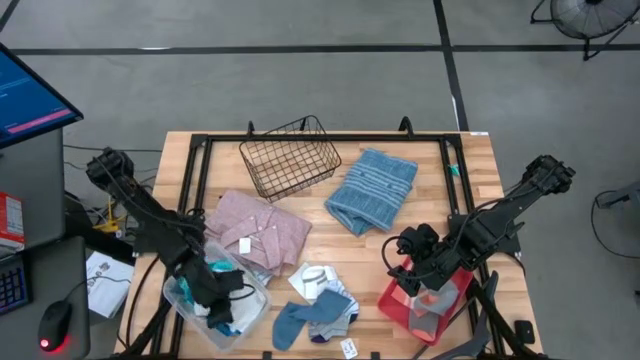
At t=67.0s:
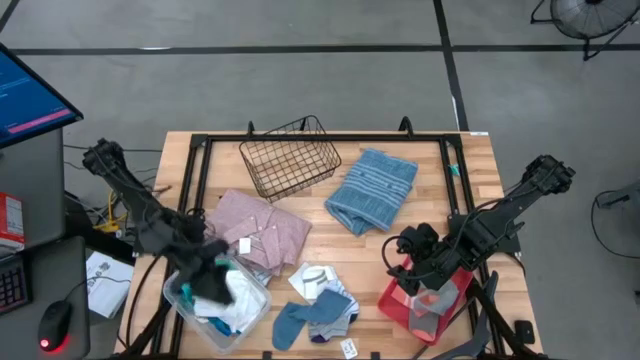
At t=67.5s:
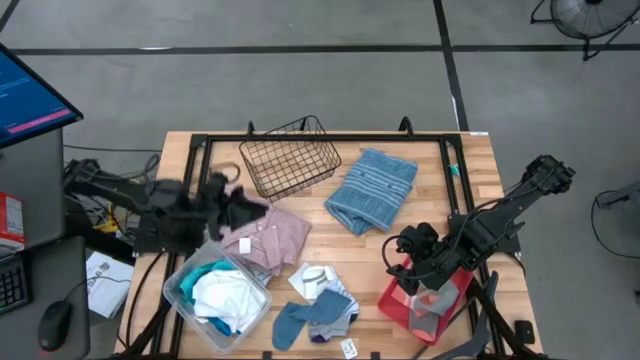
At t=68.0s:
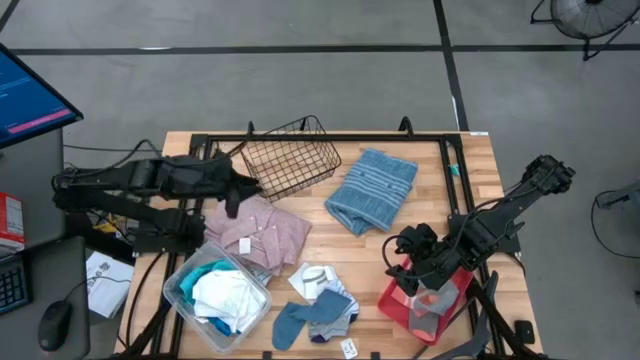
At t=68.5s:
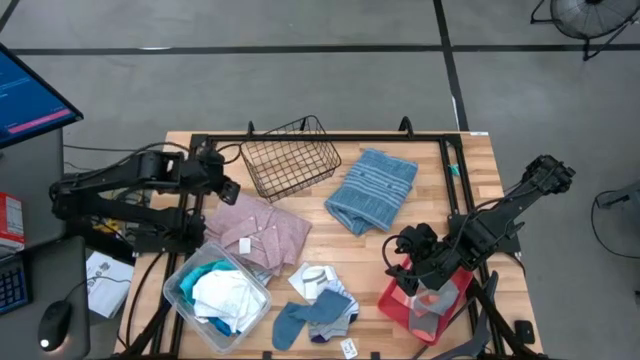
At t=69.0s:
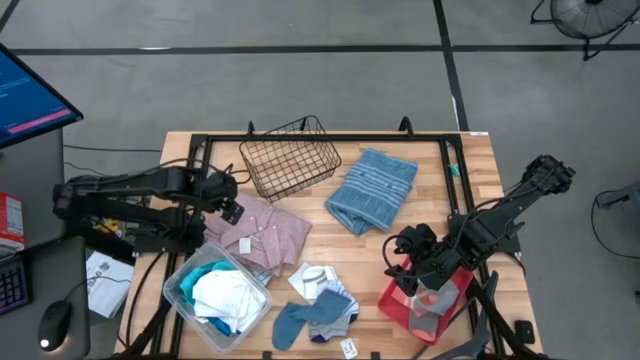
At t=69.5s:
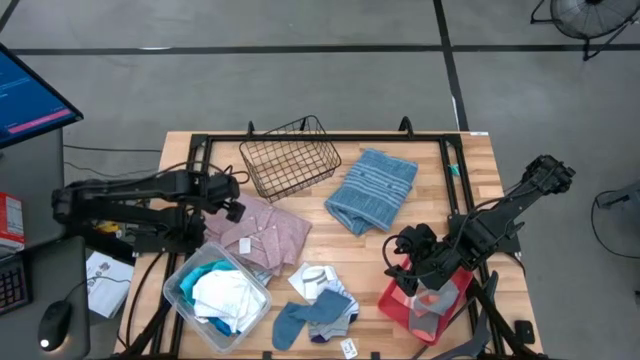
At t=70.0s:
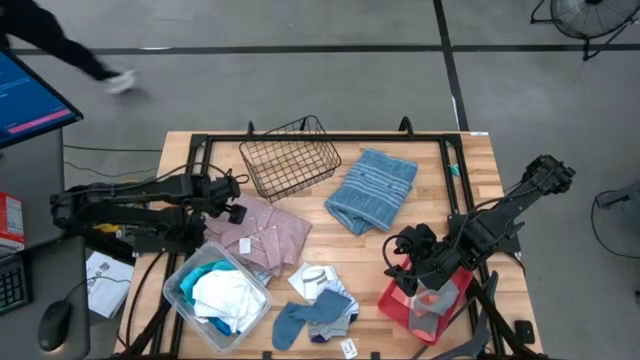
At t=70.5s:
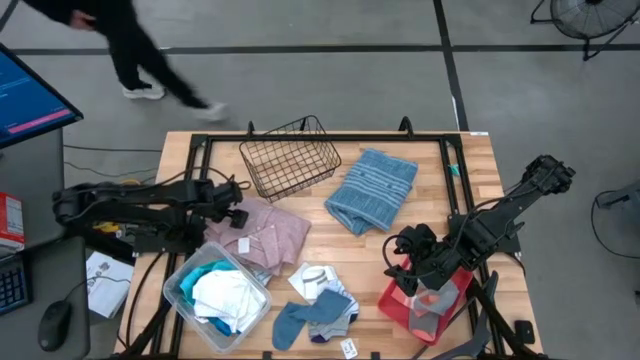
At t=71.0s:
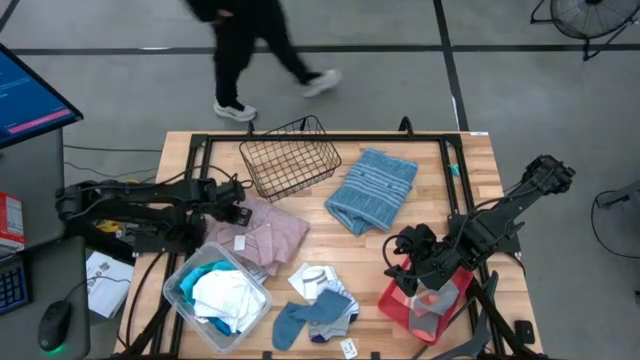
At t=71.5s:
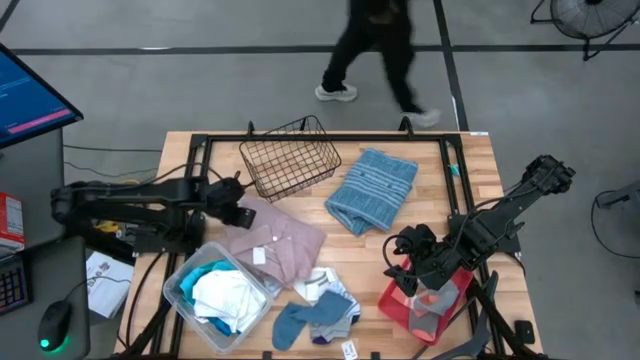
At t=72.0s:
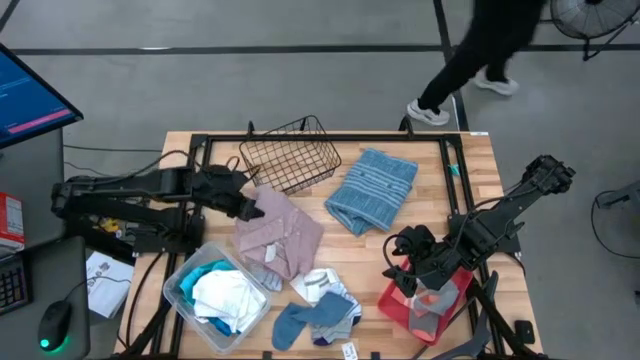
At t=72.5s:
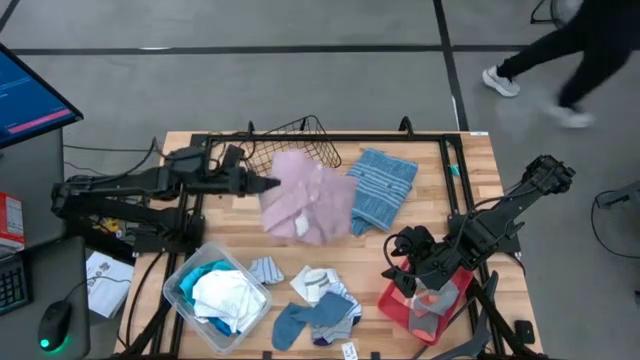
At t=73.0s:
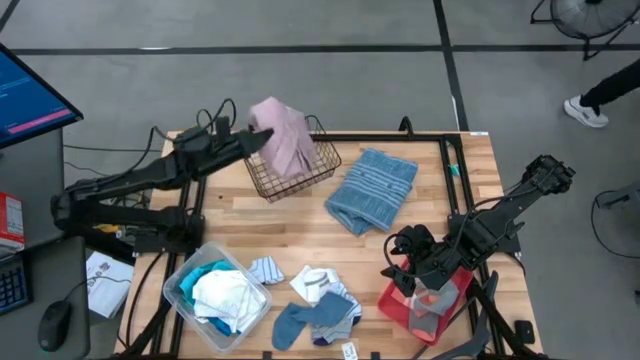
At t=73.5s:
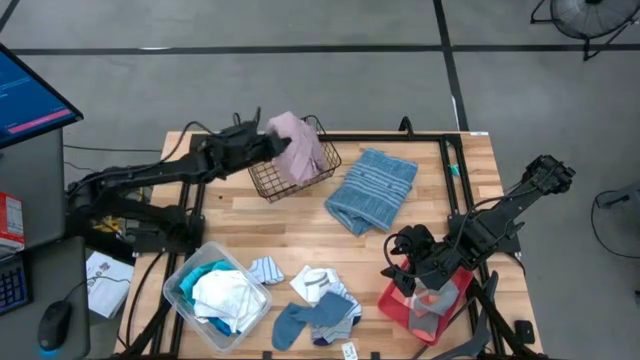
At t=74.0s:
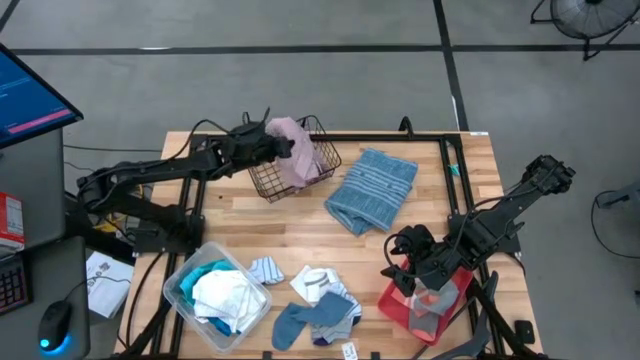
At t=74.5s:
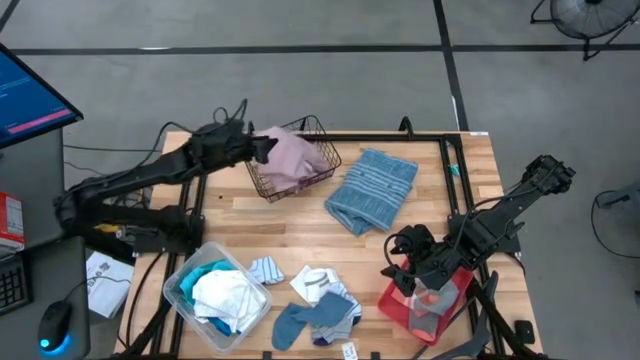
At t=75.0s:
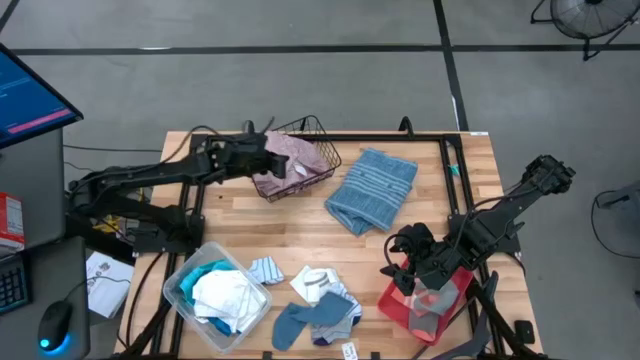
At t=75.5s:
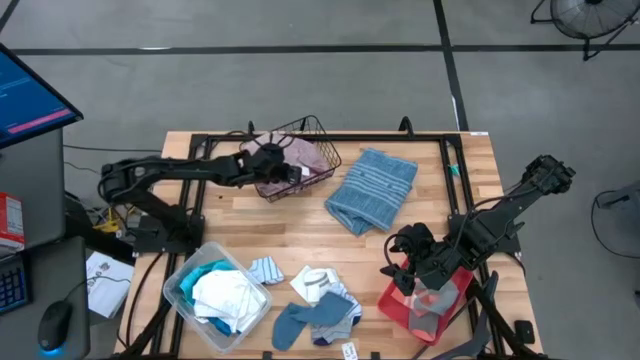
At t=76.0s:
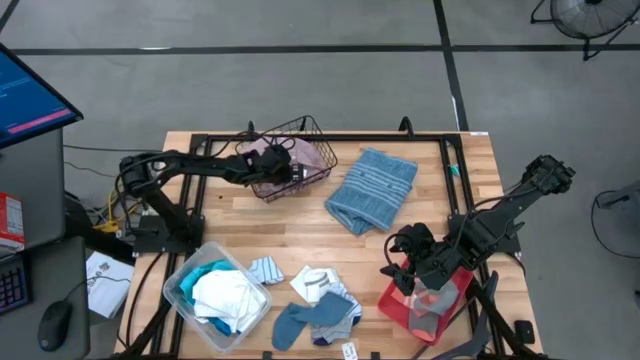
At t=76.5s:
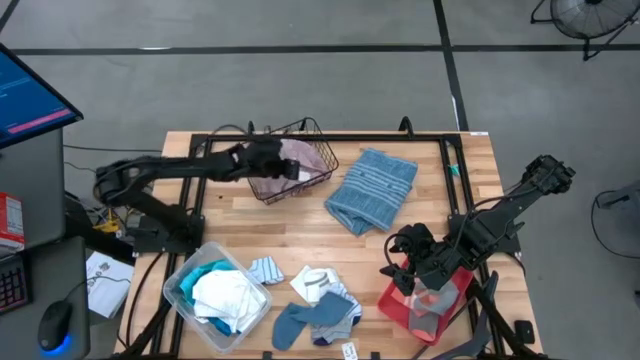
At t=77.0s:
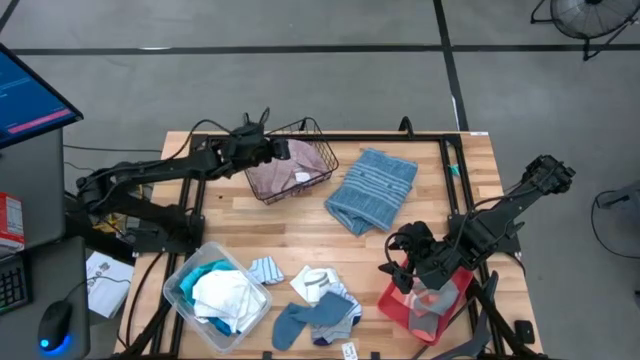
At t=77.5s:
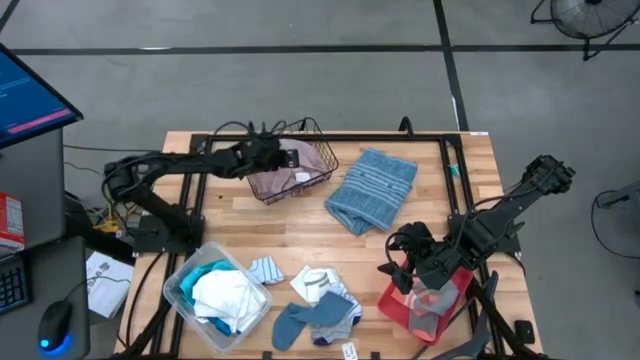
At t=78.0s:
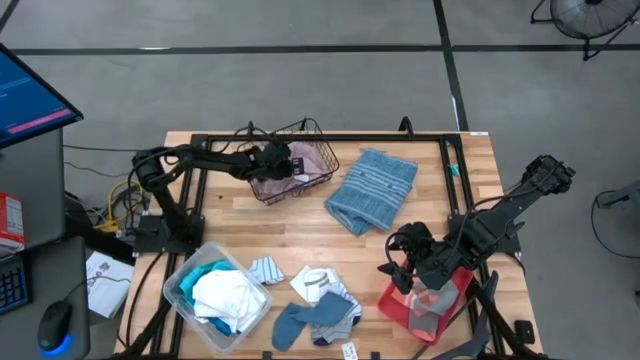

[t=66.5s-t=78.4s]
Task: Pick & Place Cloths
Put the pink polo shirt into the black mesh basket

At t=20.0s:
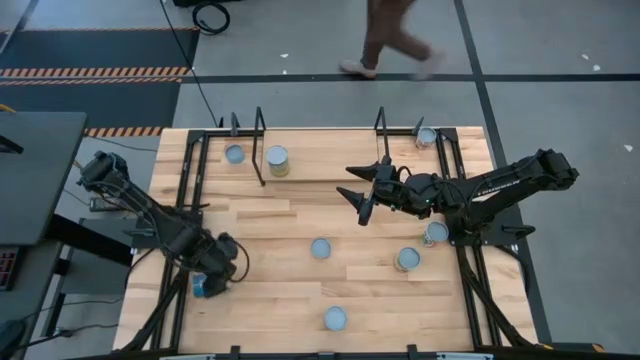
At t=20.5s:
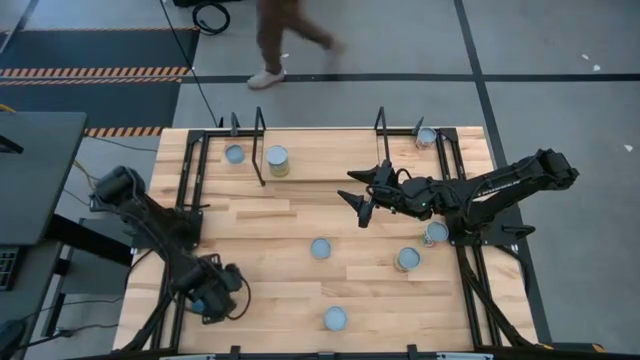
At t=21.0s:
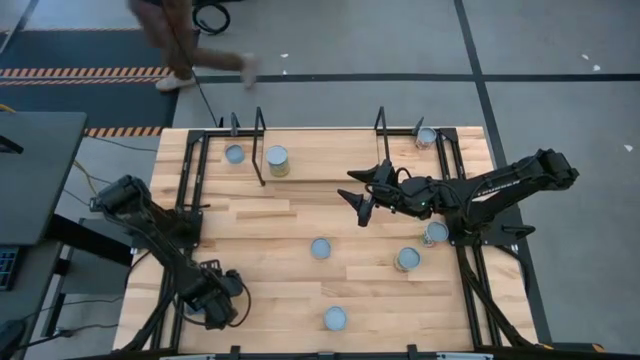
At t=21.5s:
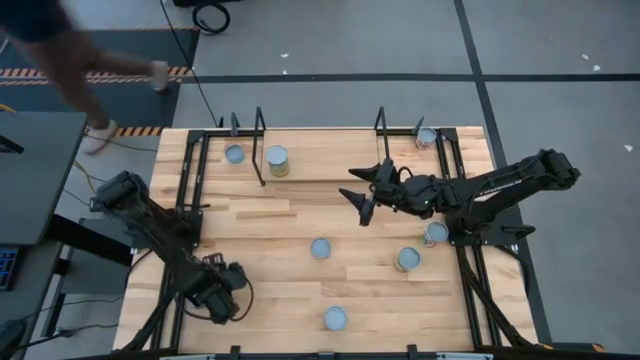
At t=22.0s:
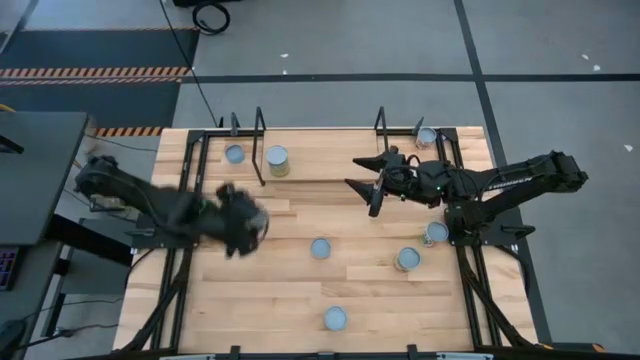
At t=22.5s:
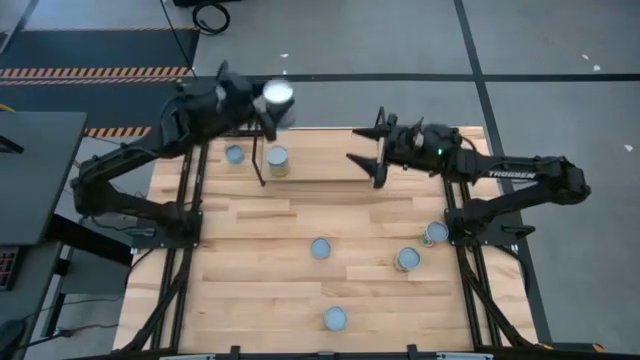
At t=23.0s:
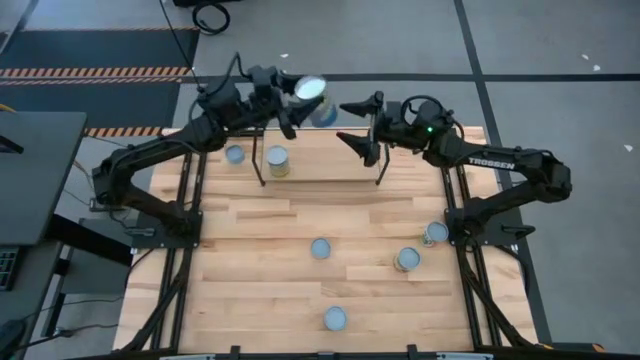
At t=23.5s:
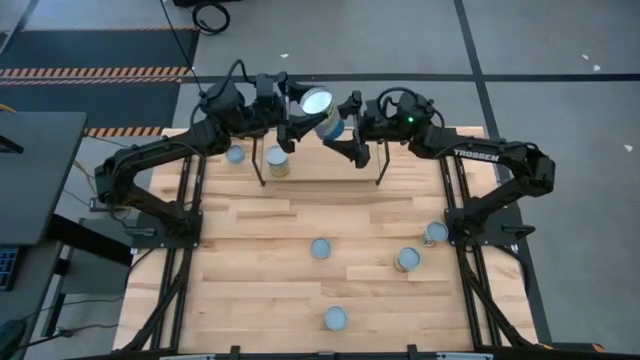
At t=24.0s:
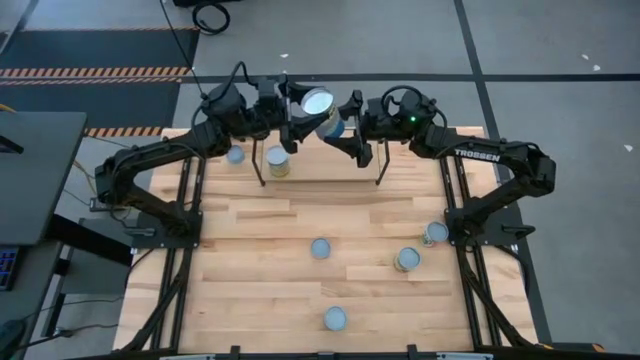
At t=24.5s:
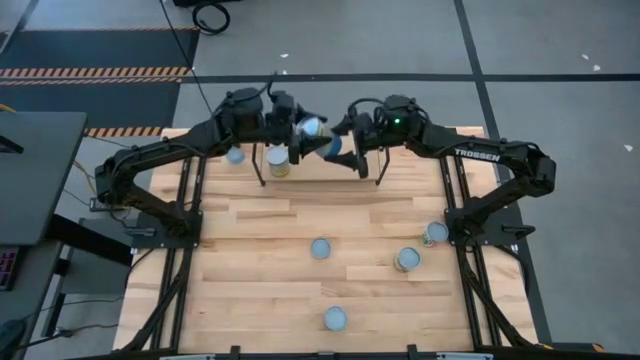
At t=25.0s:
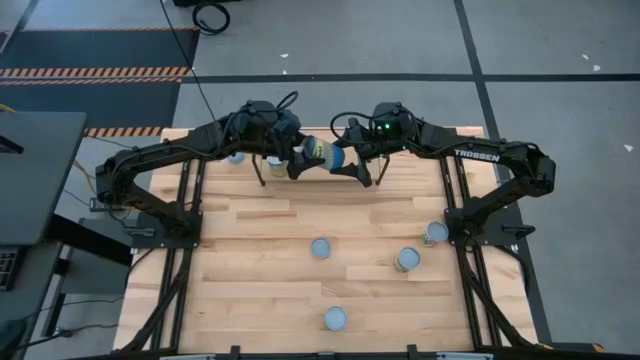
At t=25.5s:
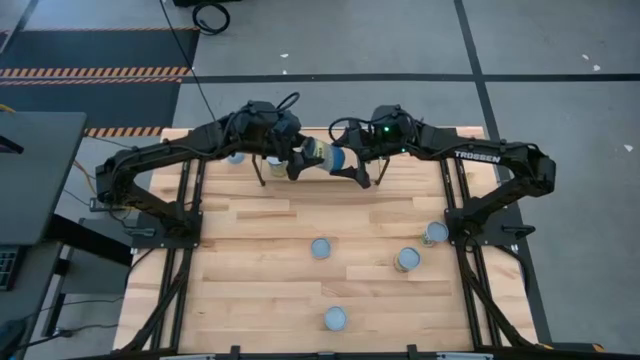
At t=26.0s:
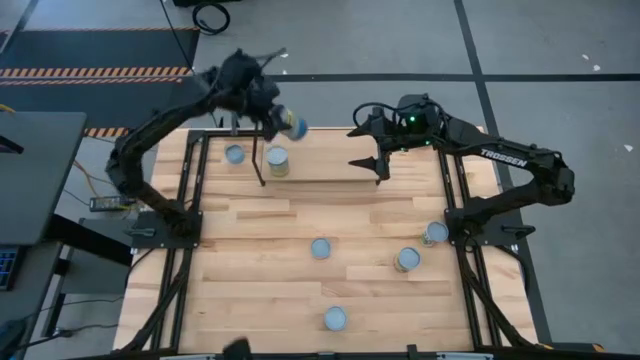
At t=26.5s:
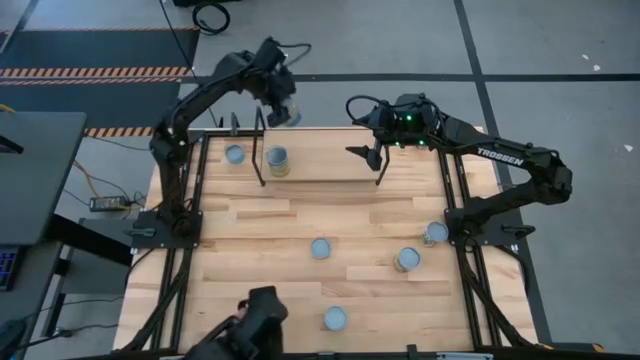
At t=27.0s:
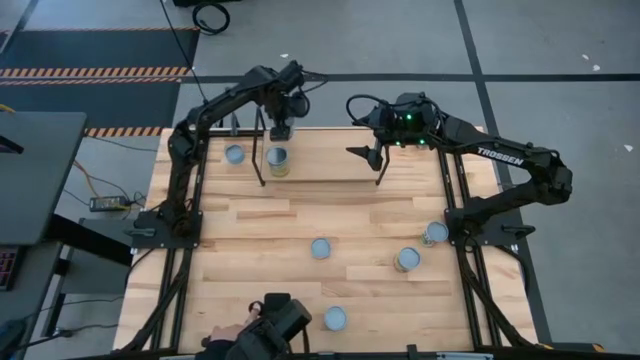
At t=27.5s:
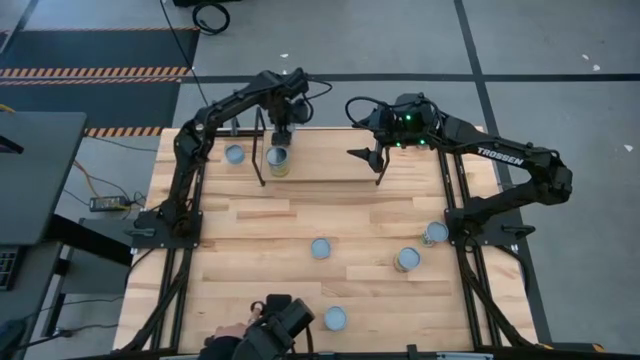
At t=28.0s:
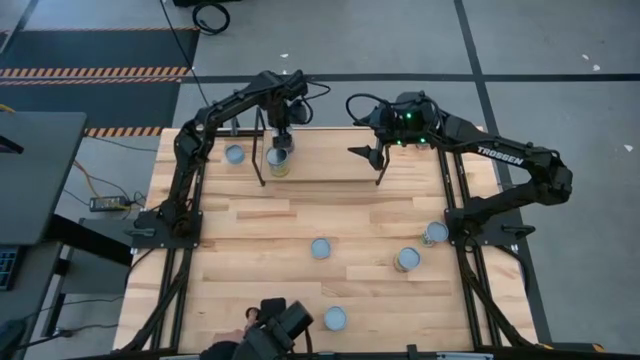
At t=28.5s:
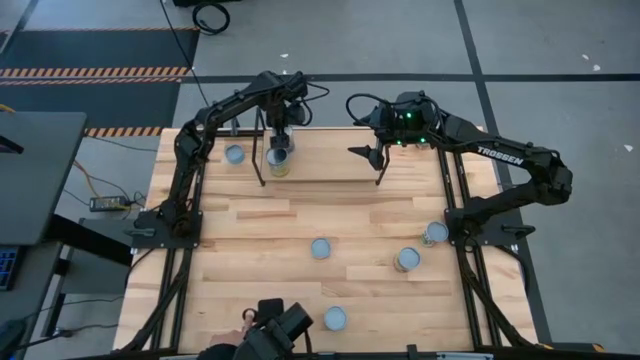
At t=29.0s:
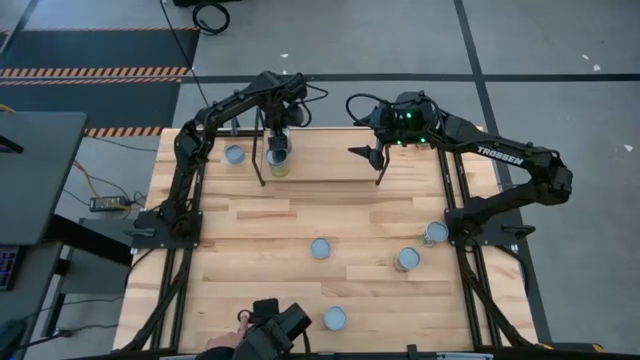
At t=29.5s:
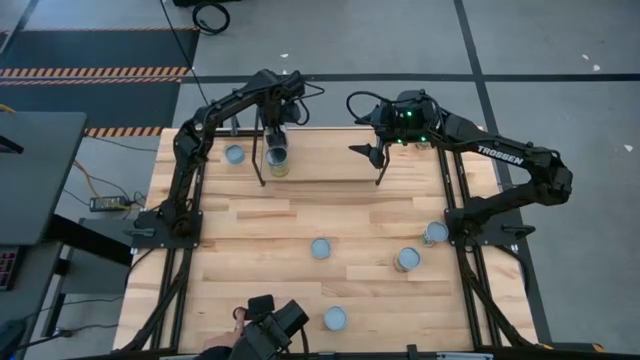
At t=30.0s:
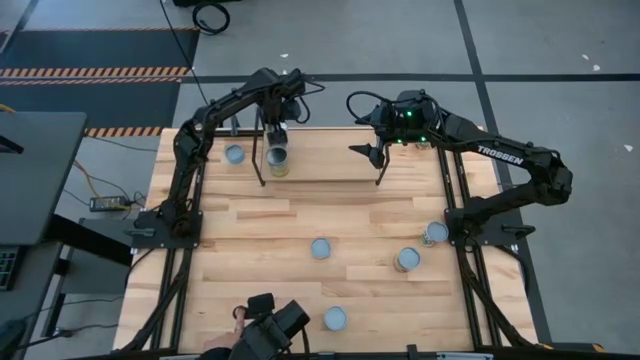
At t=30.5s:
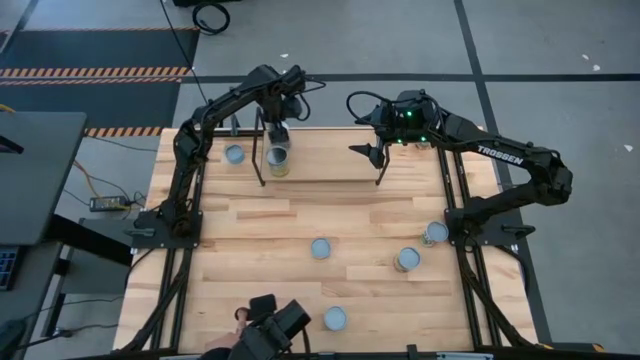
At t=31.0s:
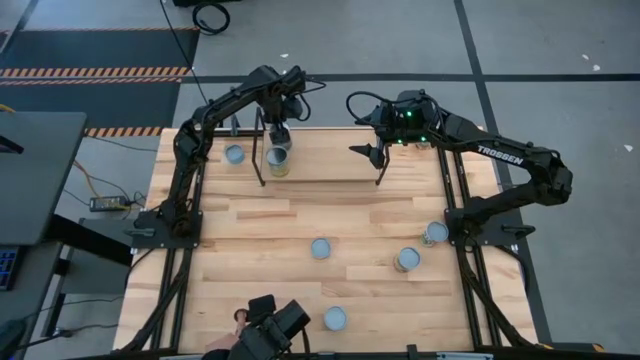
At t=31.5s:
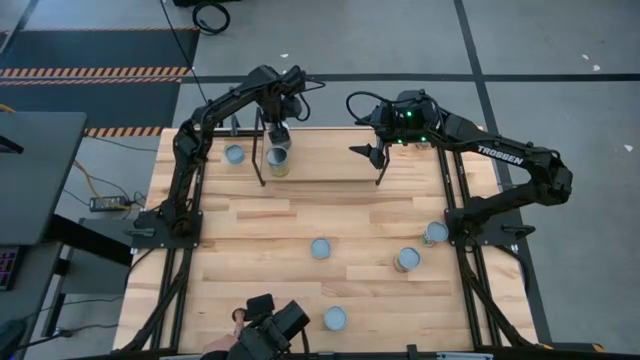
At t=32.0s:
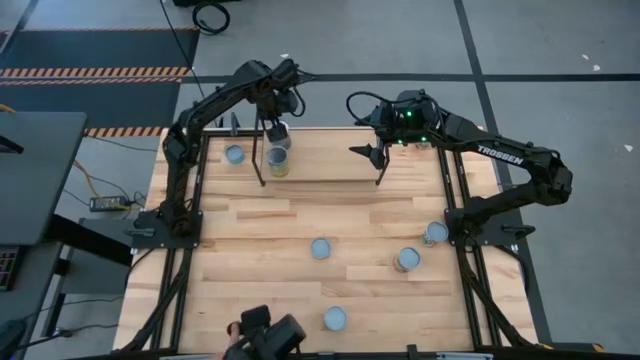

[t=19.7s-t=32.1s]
Task: Pick and place cans onto a shelf
Put the blue can on the shelf aligned with the light orange can
